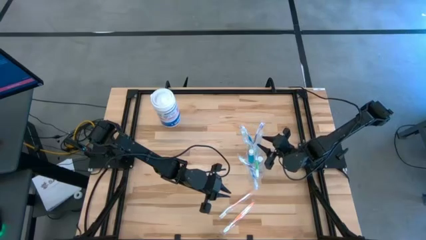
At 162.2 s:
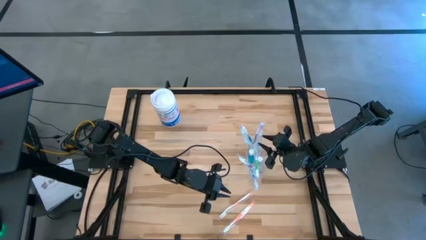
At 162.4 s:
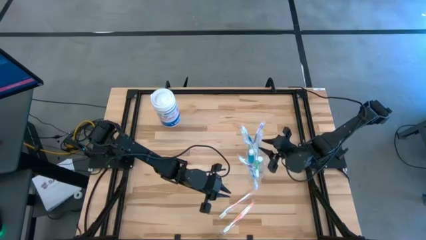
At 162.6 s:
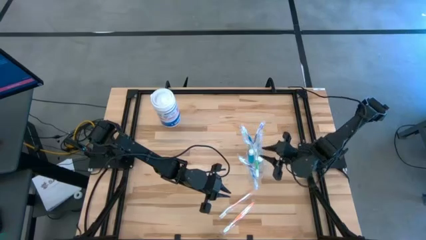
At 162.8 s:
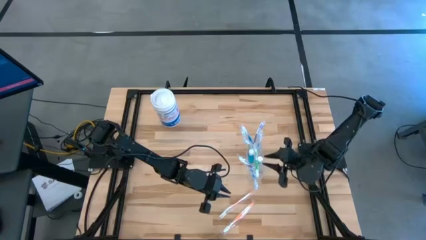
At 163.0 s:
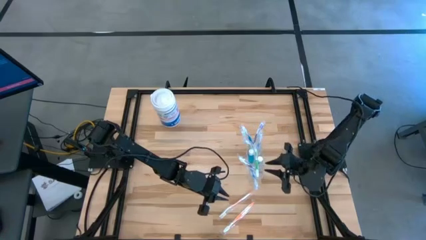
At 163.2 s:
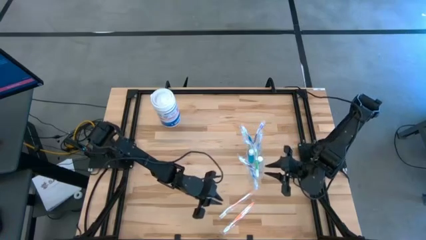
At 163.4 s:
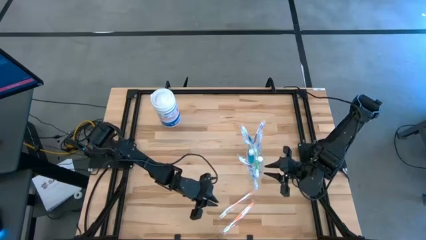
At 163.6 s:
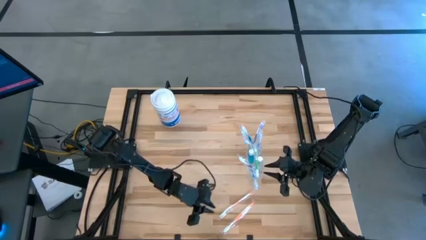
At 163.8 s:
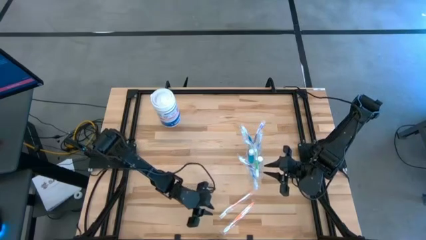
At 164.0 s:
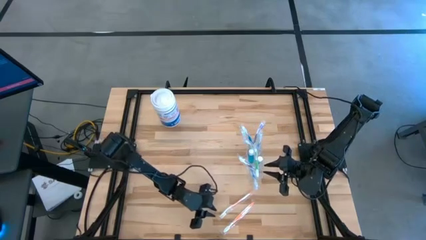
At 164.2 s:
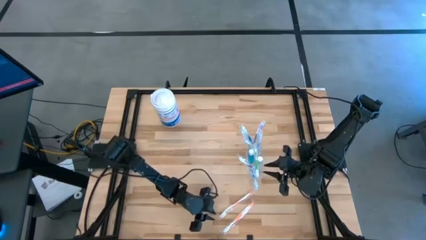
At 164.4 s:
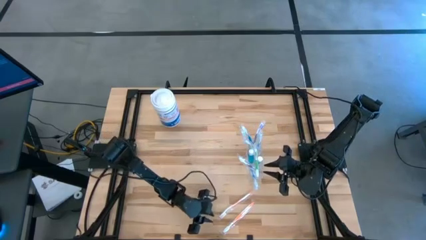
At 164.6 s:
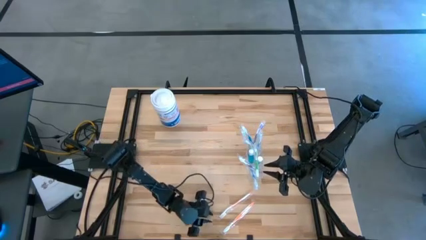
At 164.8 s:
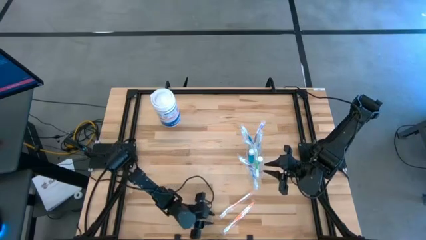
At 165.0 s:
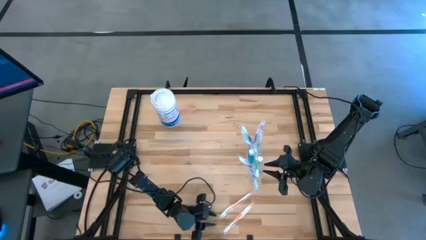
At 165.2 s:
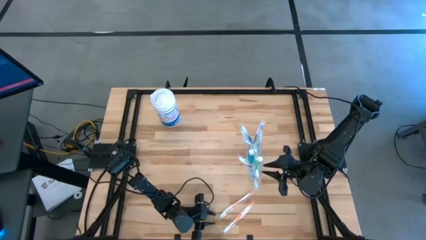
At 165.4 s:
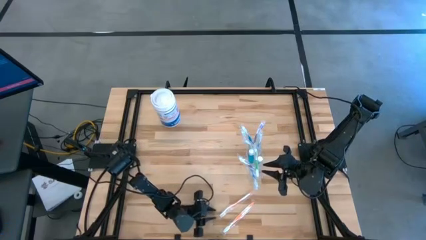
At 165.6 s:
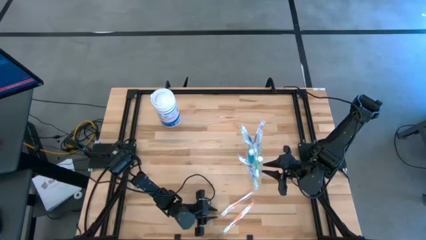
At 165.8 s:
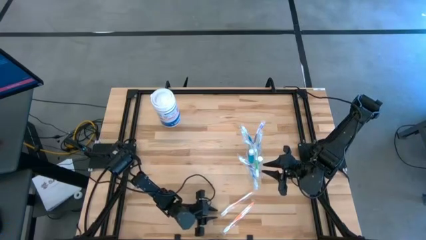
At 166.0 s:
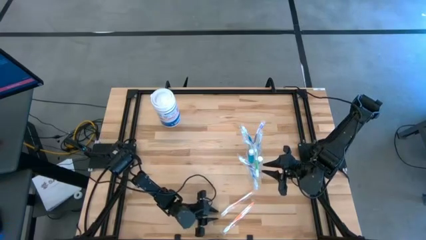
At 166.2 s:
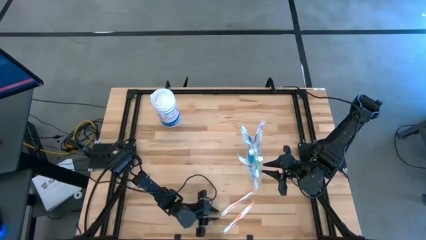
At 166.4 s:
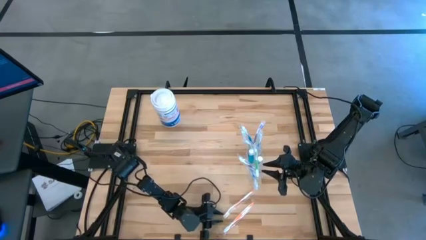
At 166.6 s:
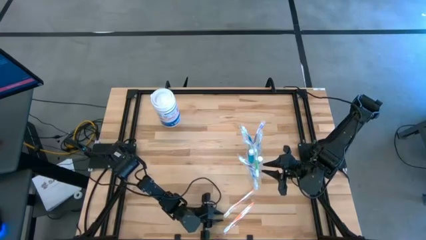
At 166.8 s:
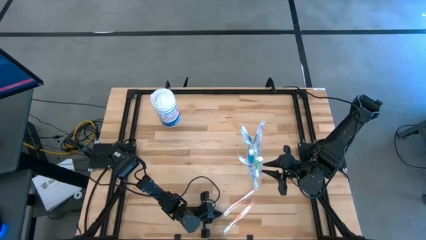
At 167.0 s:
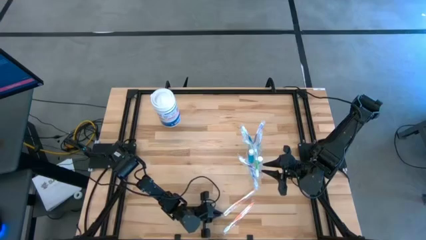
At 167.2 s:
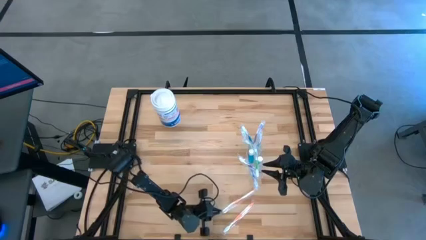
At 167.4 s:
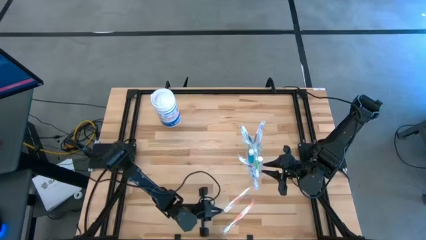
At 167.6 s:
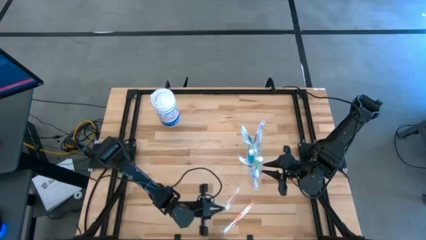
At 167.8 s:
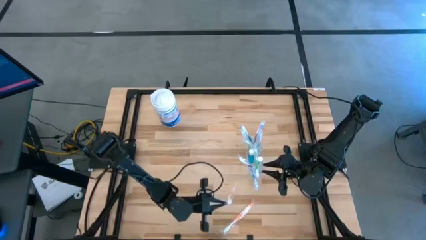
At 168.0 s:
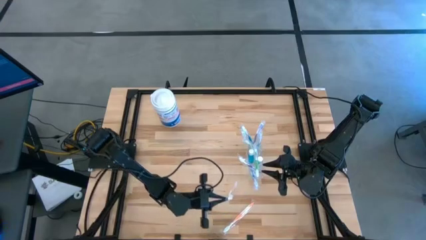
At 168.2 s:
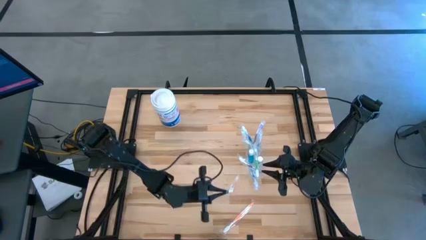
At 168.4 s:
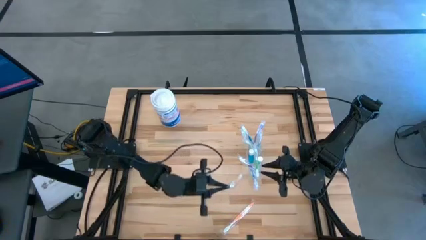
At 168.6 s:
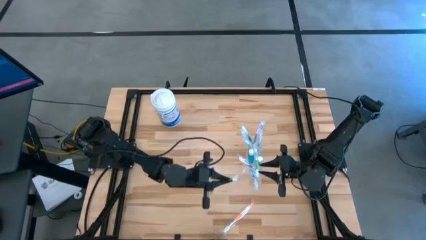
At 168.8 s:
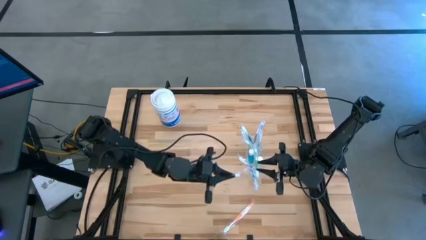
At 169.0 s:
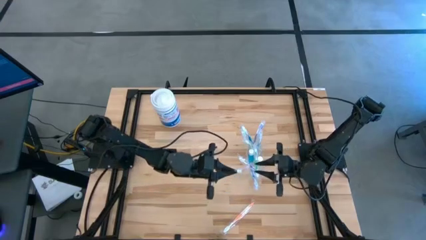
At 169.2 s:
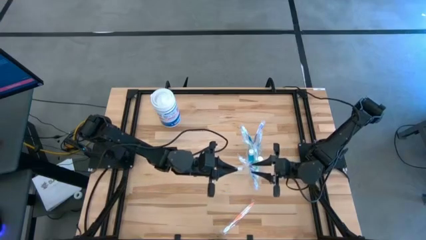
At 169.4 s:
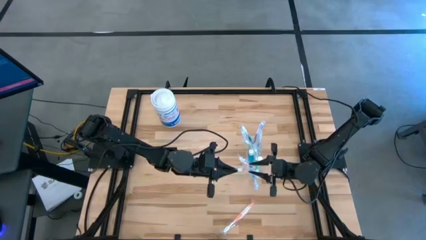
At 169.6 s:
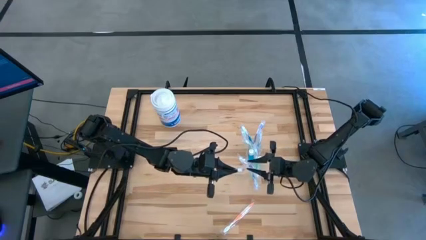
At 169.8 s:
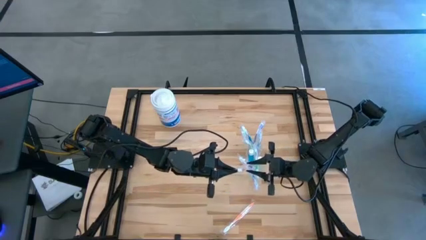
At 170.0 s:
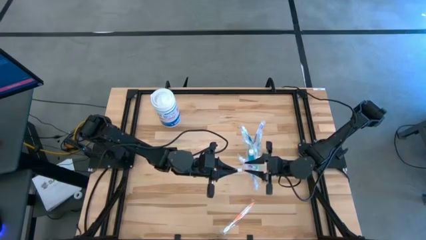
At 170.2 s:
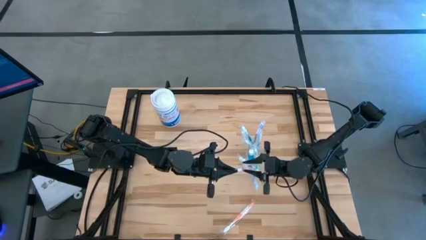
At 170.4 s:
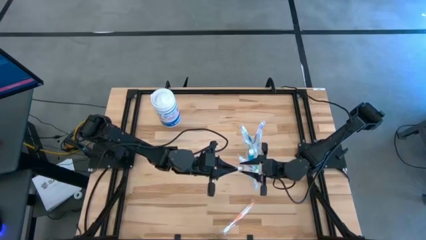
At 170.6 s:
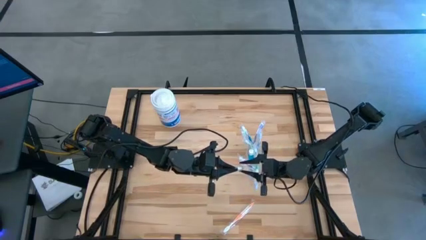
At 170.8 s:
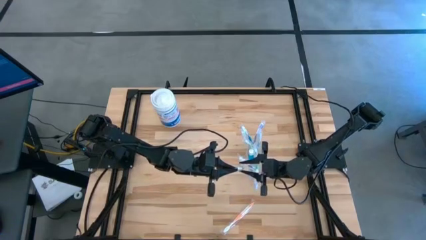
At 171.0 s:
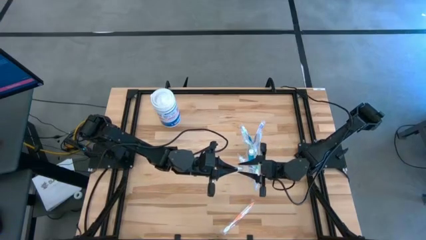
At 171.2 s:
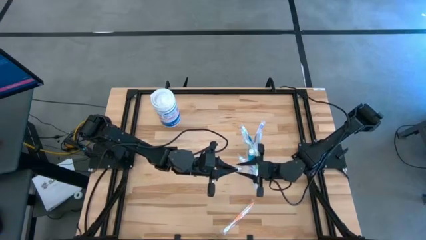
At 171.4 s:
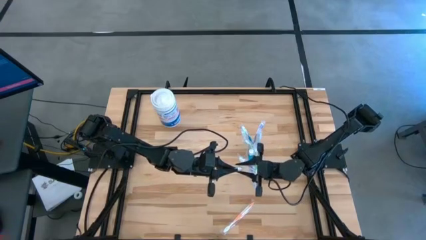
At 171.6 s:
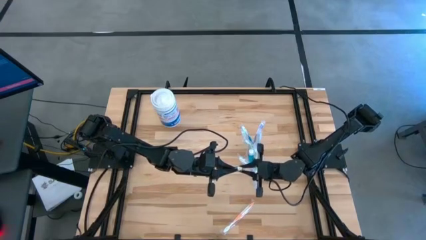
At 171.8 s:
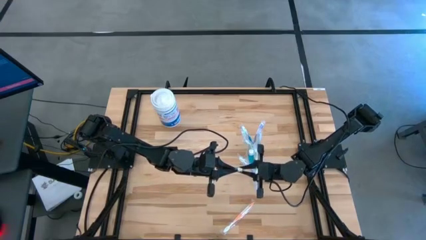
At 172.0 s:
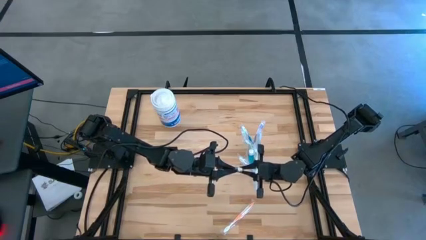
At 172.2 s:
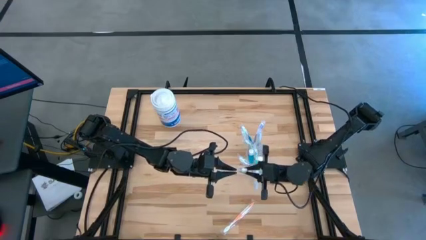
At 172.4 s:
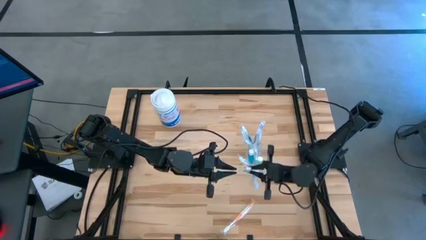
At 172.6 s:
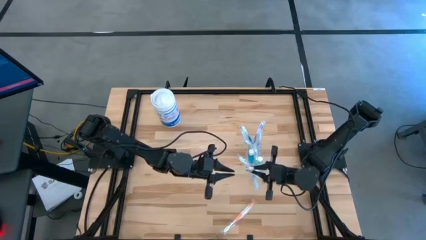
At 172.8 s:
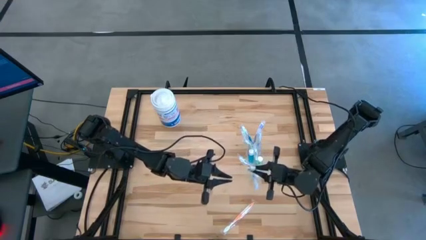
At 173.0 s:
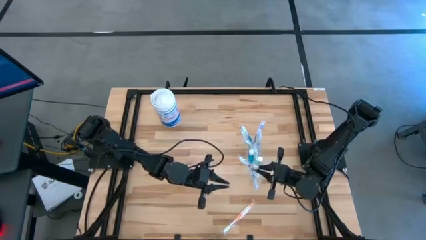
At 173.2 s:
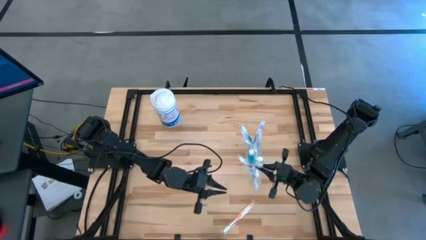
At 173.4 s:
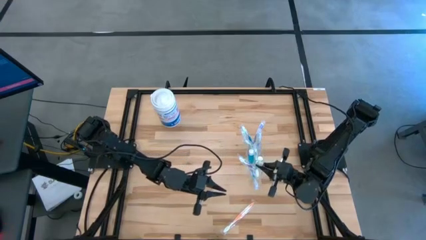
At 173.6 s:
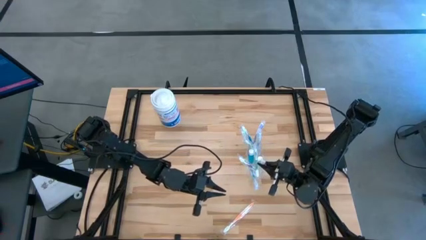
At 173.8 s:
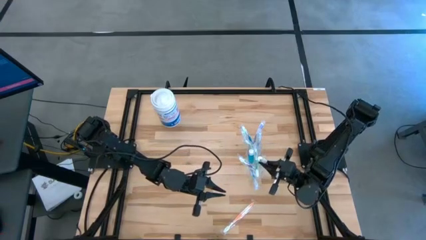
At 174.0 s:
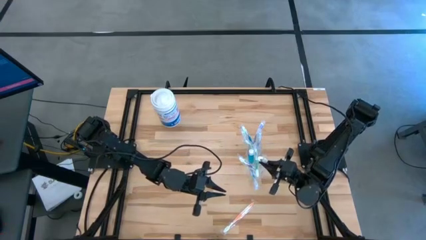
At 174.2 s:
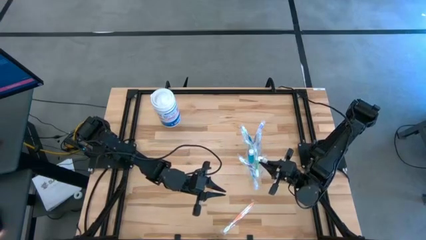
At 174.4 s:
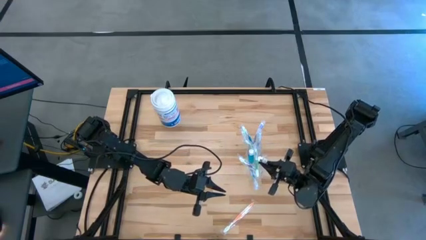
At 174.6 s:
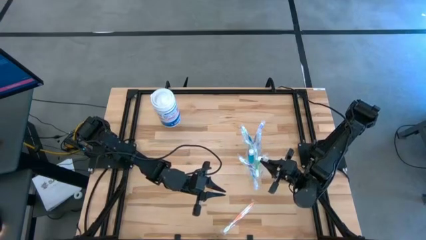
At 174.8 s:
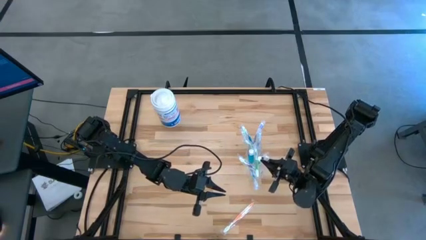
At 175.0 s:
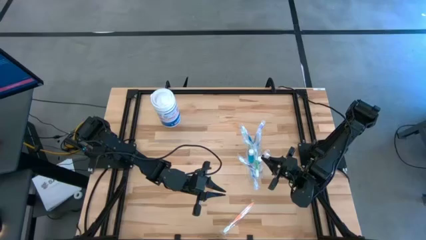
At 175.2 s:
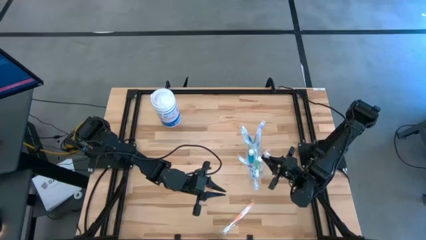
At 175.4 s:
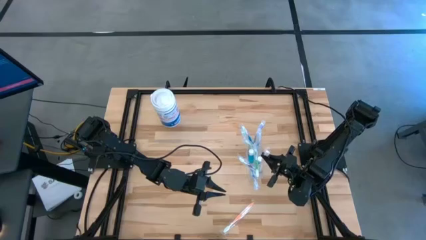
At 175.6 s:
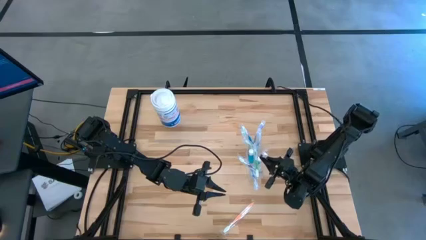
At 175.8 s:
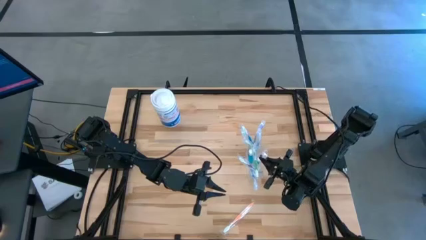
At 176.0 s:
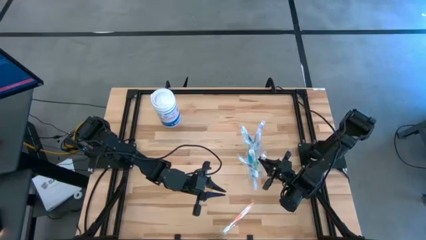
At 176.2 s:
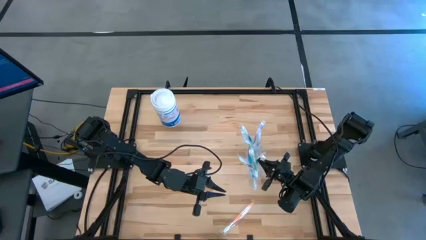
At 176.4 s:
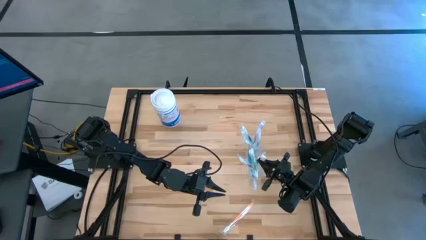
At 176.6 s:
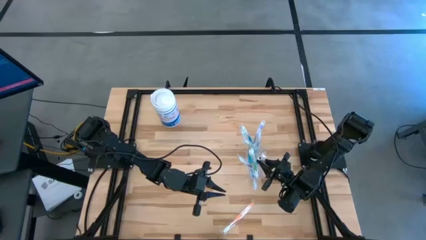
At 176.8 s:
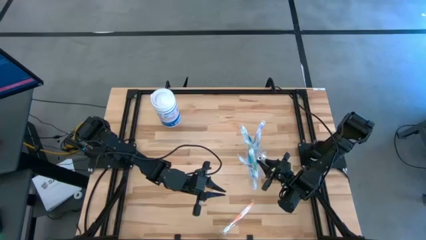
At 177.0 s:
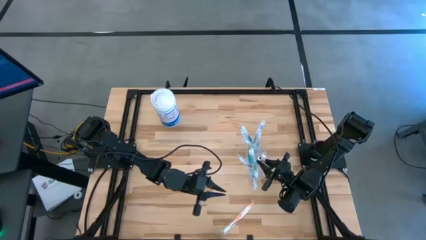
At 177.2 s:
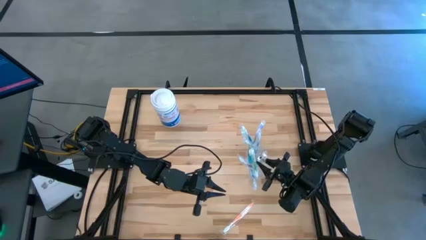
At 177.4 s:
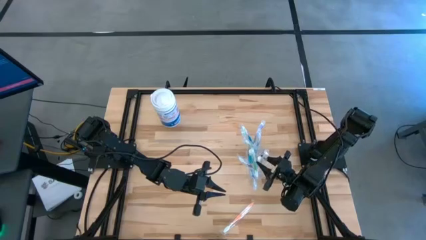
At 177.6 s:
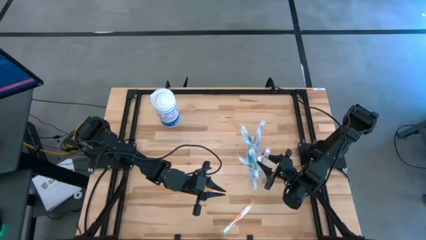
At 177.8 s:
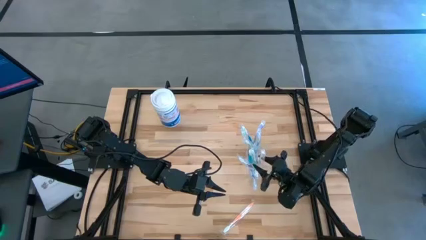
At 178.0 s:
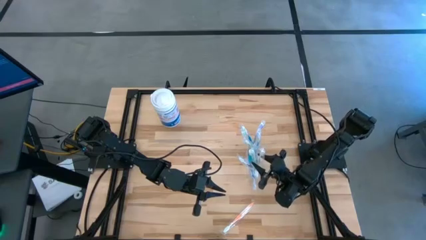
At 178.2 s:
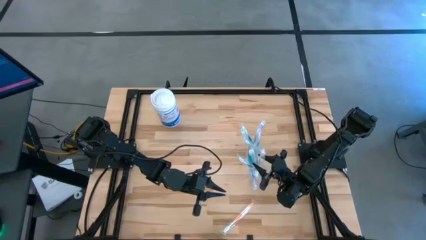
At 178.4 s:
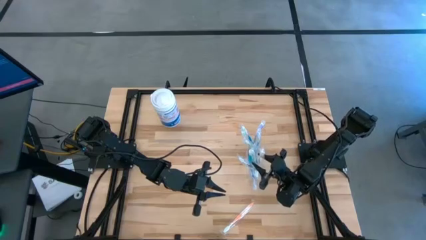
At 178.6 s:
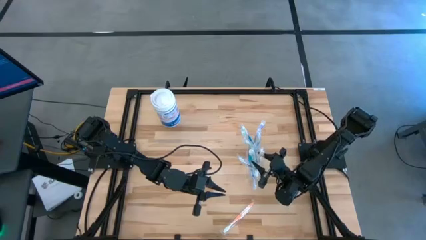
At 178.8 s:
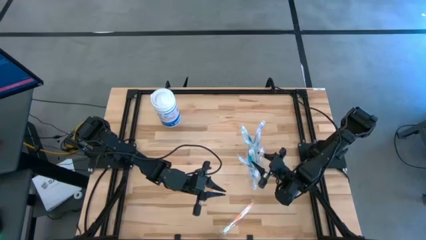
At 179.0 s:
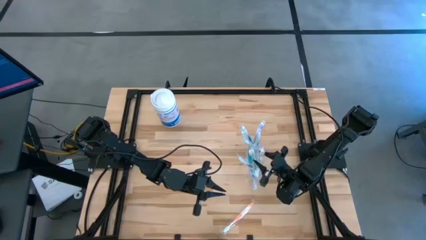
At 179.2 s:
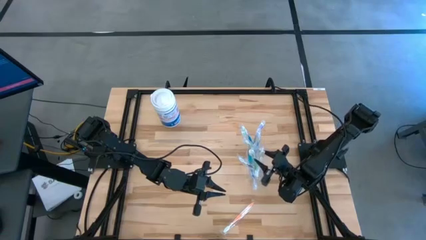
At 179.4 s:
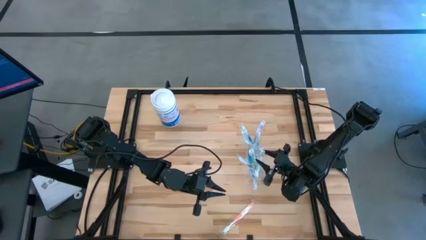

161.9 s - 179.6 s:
Task: Pick & Place toothbrushing station
Put the orange toothbrush into the transparent organizer
